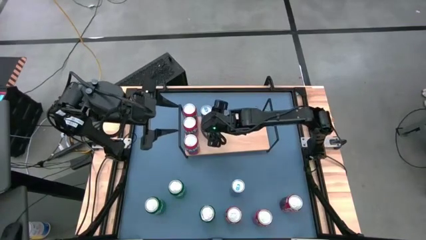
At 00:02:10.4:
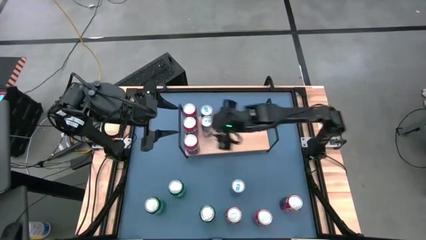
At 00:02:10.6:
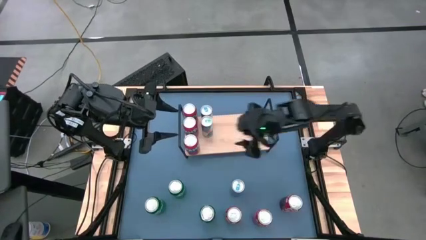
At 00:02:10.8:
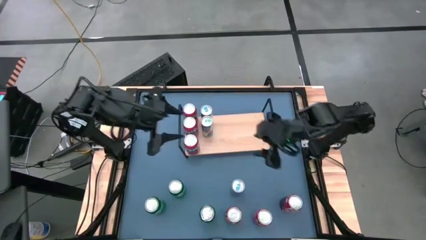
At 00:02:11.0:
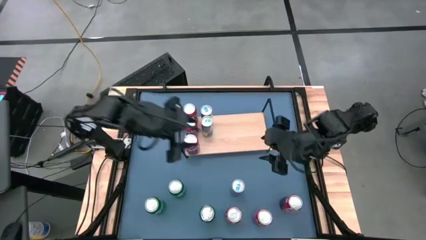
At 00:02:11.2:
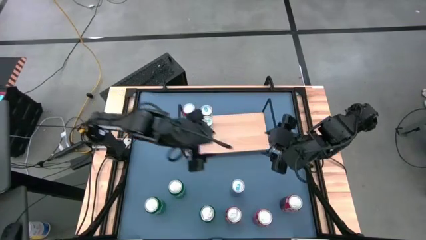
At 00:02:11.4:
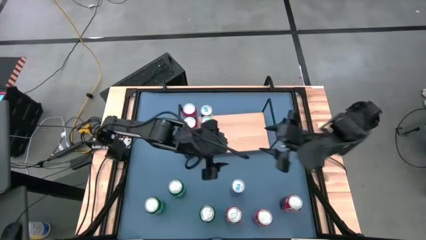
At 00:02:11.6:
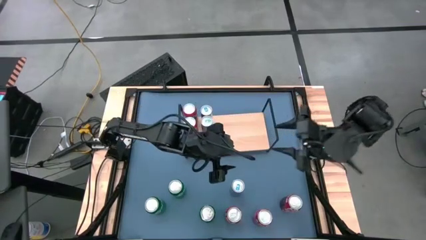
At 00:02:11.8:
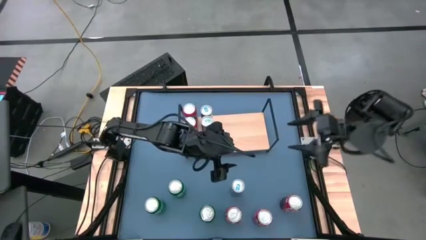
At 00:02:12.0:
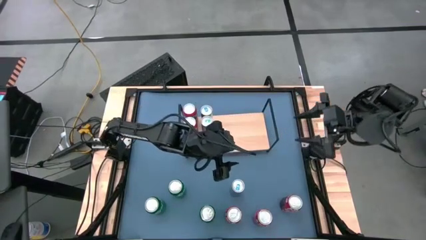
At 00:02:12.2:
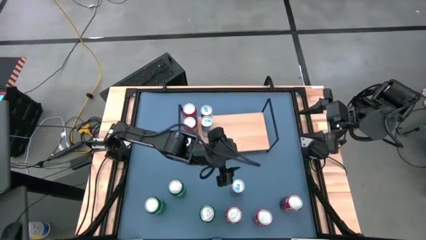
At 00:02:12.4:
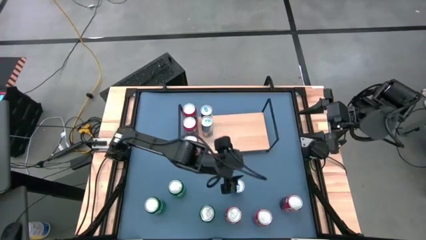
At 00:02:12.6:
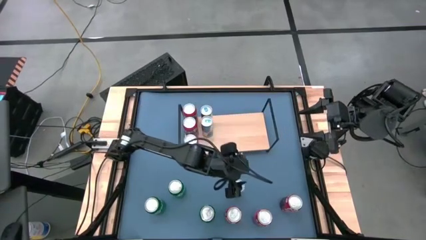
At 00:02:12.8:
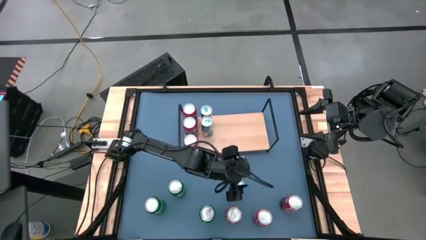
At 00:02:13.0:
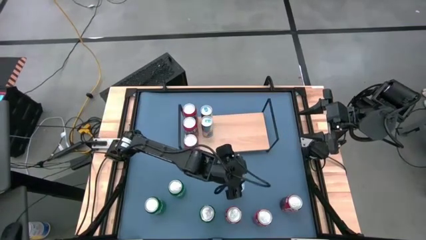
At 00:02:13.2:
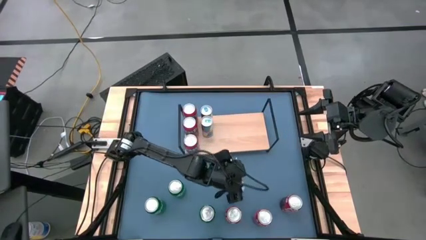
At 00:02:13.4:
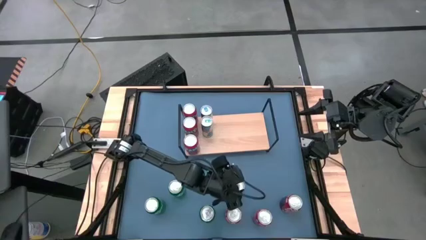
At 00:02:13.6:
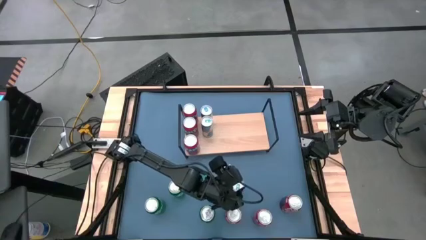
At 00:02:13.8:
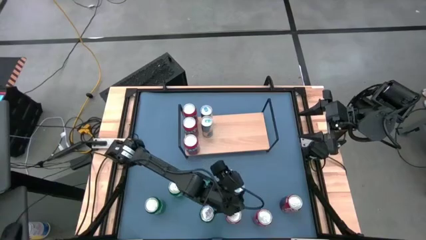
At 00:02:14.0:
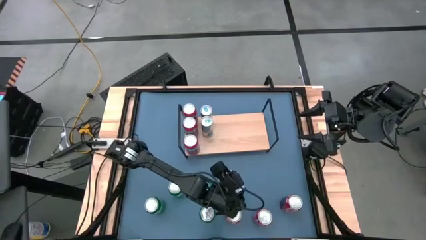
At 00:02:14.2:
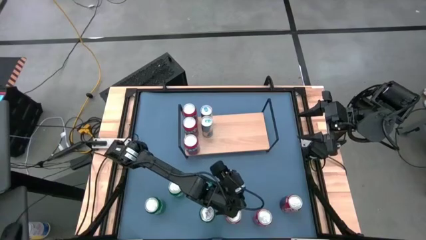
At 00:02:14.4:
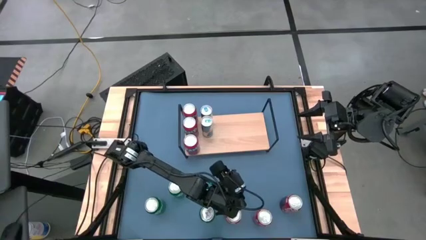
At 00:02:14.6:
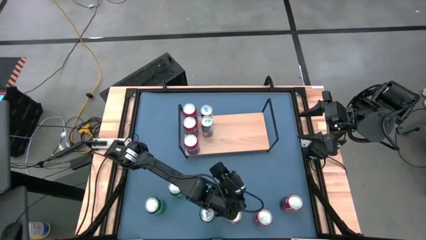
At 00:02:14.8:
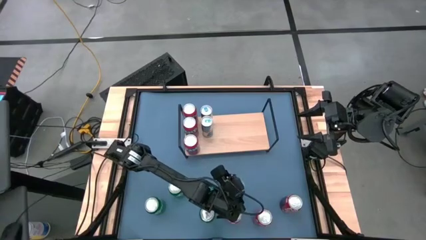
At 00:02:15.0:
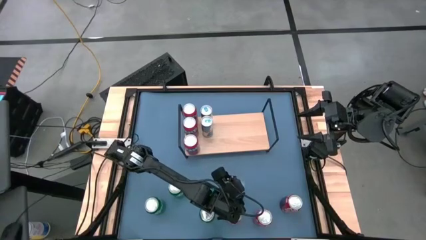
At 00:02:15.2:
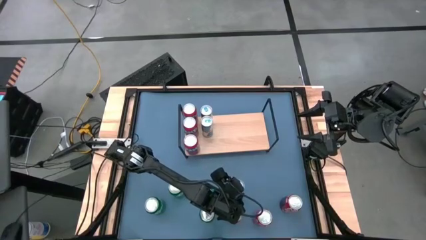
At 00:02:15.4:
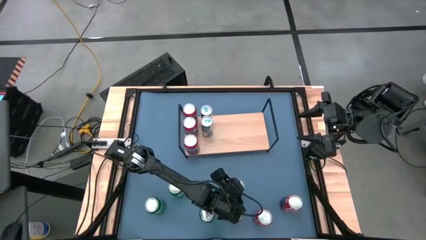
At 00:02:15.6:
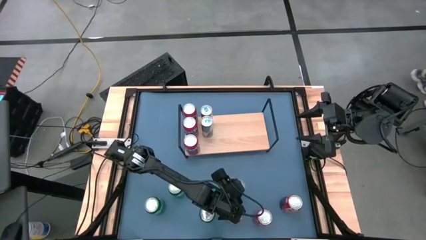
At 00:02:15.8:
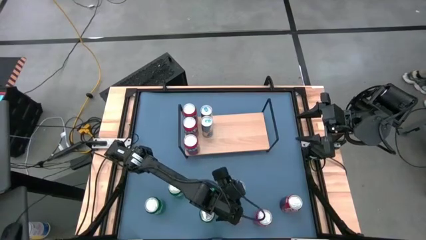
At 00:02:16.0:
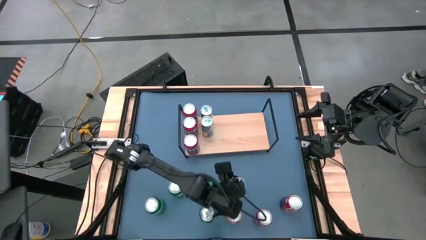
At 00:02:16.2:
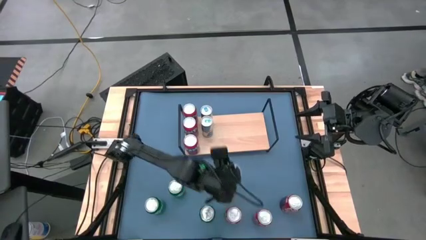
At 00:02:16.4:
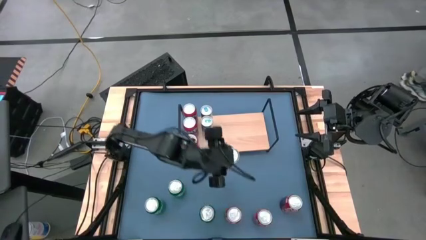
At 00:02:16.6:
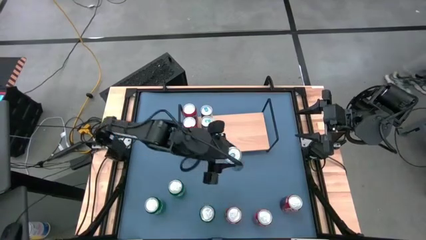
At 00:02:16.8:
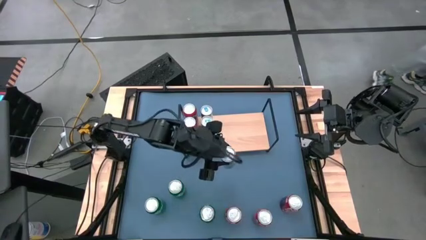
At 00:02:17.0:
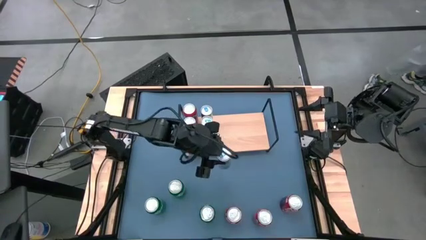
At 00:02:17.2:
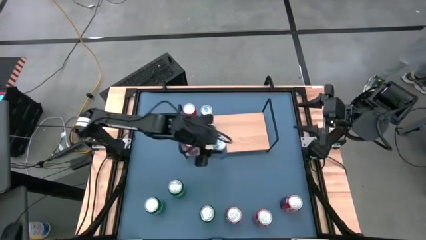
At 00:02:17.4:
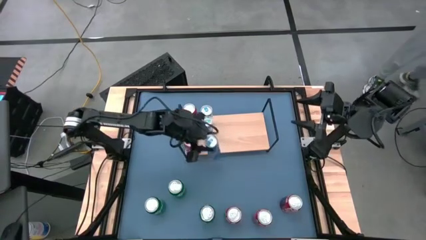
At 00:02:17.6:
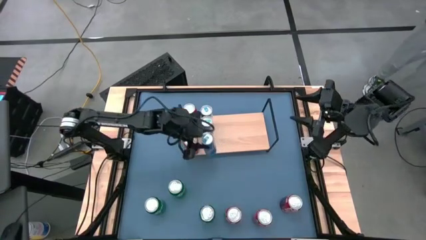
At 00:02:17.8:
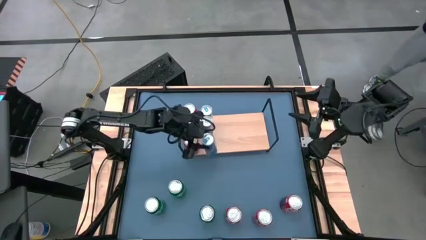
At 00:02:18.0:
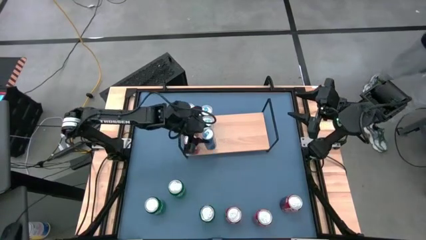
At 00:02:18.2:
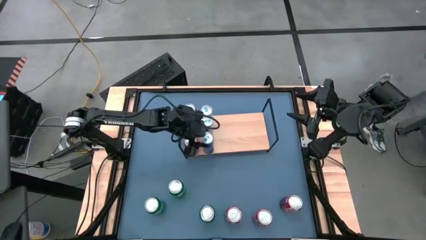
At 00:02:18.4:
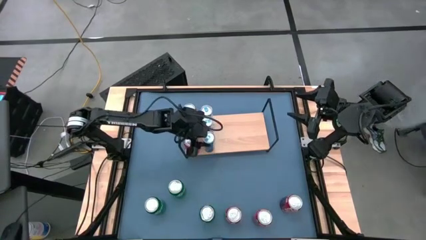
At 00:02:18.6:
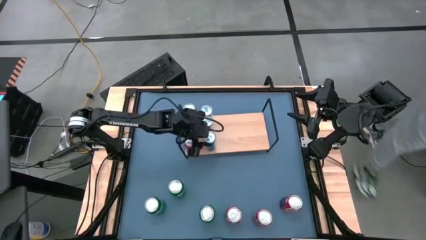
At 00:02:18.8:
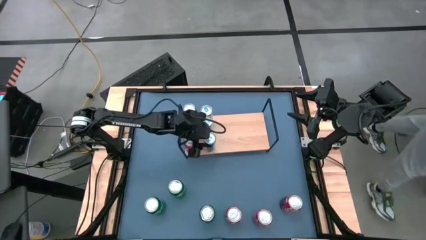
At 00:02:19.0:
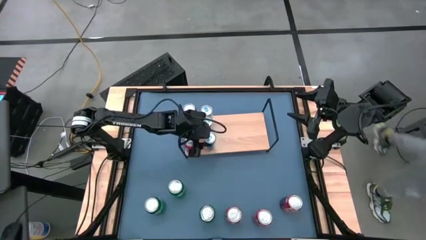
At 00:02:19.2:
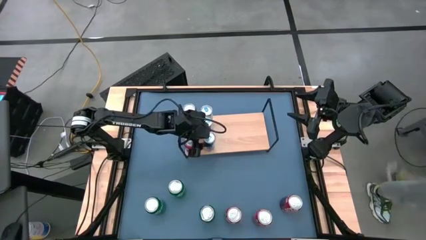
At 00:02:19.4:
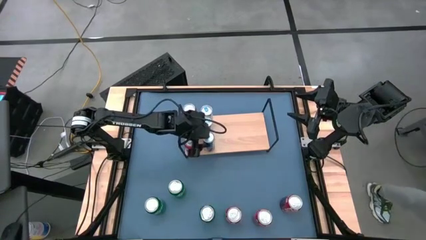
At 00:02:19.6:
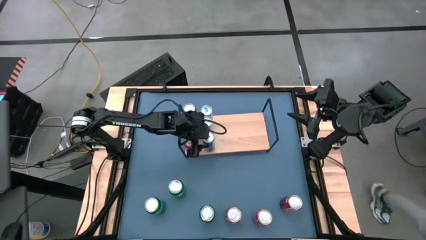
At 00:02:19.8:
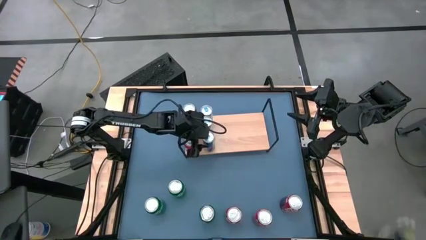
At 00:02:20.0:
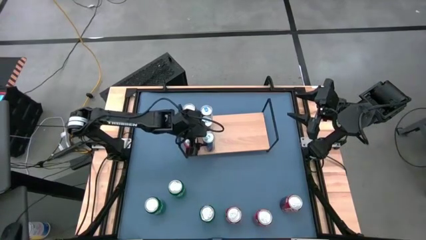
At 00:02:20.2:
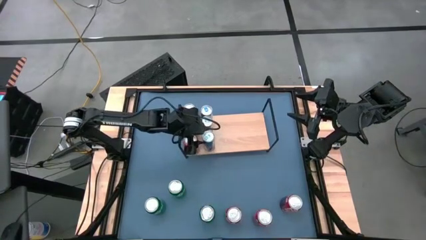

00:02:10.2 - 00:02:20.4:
Task: Place canned beverage on shelf
Put the blue soda can on the shelf aligned with other blue soda cans

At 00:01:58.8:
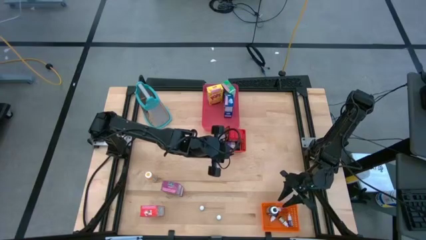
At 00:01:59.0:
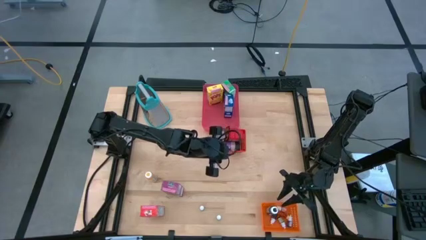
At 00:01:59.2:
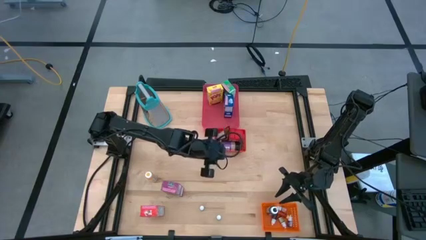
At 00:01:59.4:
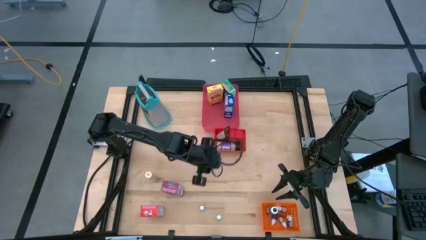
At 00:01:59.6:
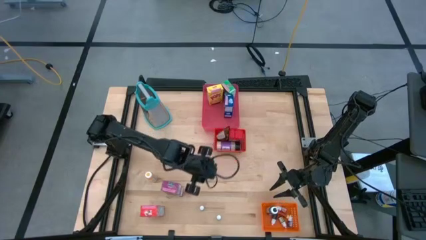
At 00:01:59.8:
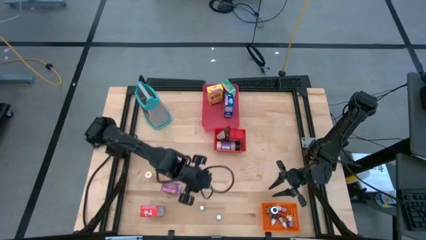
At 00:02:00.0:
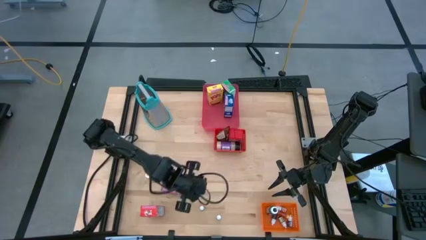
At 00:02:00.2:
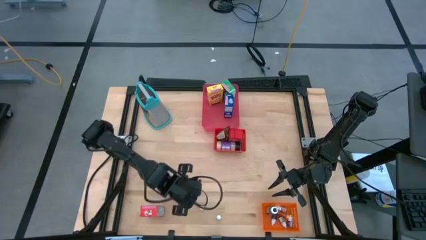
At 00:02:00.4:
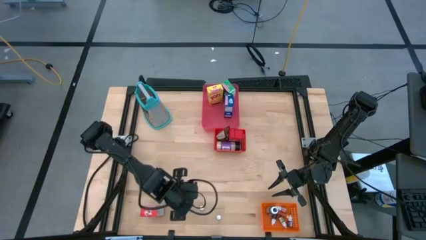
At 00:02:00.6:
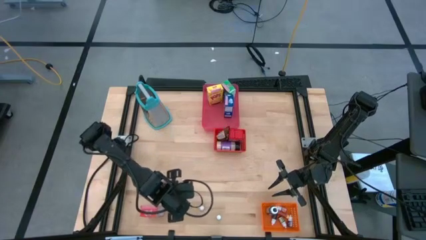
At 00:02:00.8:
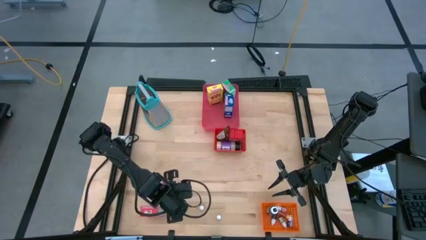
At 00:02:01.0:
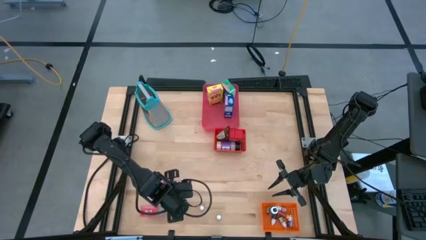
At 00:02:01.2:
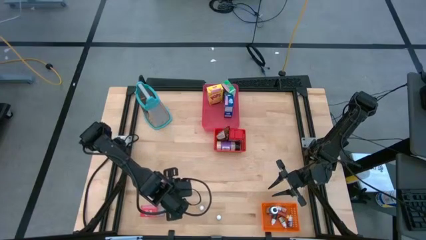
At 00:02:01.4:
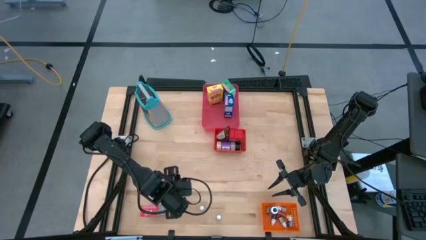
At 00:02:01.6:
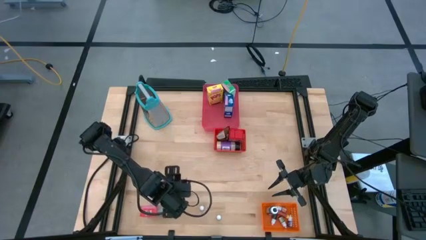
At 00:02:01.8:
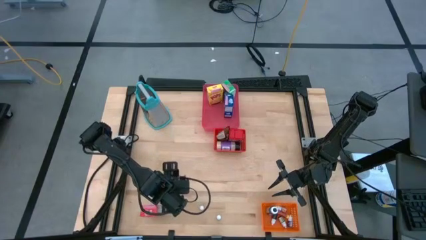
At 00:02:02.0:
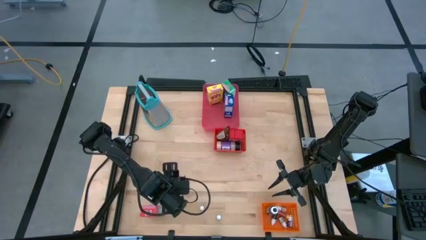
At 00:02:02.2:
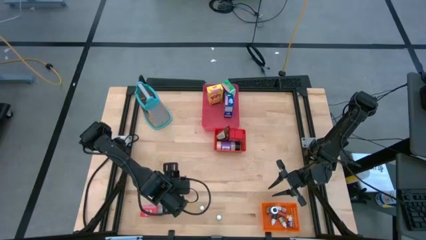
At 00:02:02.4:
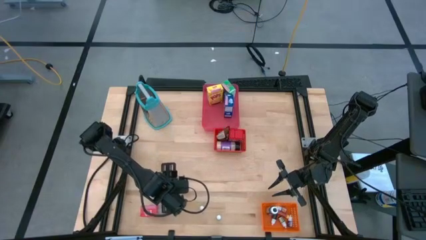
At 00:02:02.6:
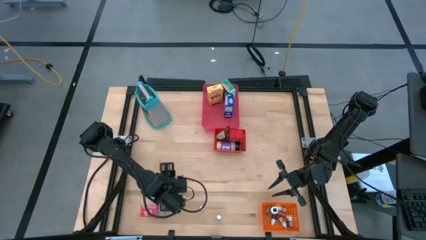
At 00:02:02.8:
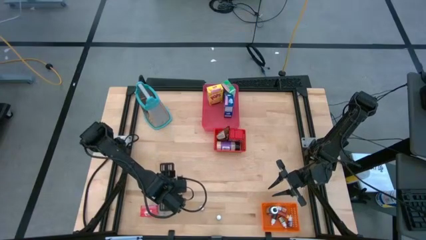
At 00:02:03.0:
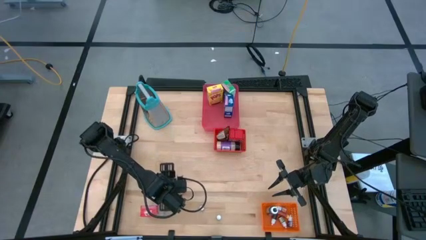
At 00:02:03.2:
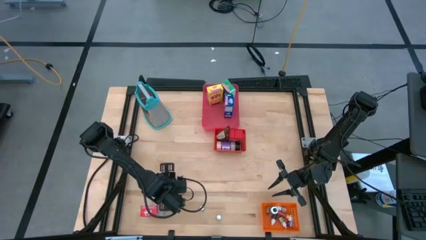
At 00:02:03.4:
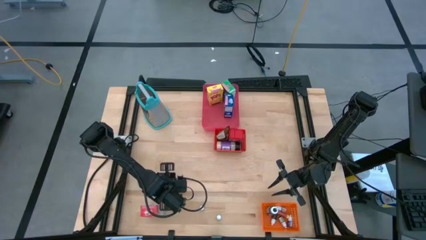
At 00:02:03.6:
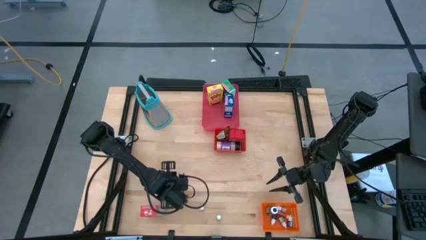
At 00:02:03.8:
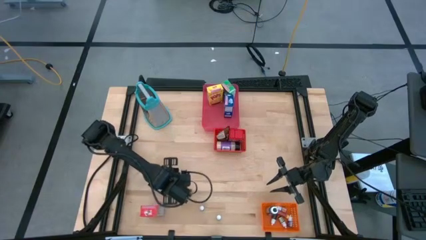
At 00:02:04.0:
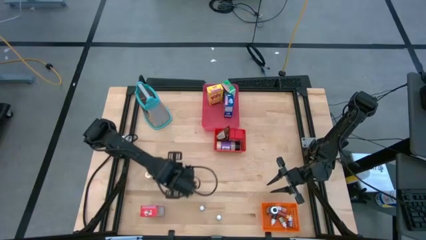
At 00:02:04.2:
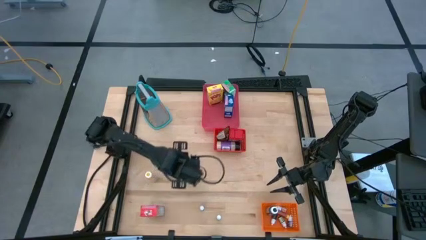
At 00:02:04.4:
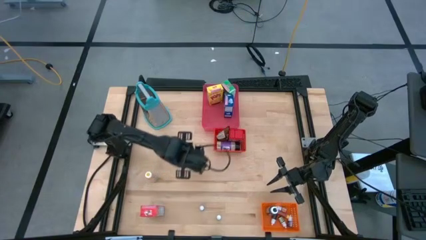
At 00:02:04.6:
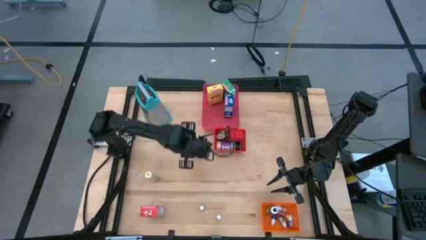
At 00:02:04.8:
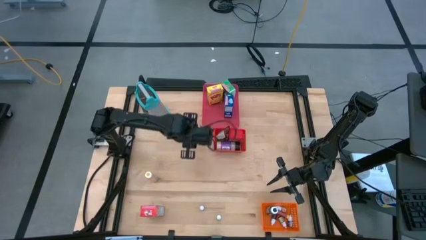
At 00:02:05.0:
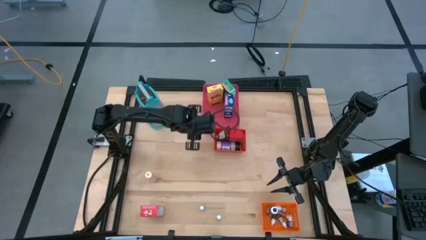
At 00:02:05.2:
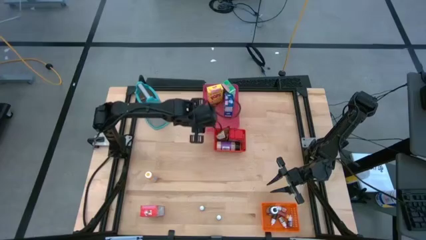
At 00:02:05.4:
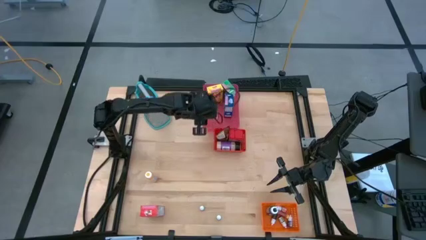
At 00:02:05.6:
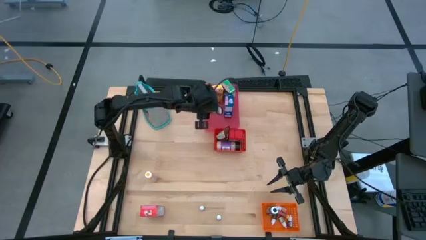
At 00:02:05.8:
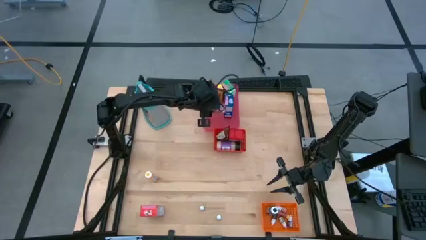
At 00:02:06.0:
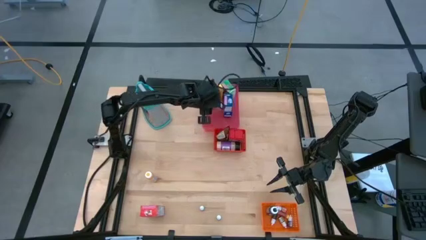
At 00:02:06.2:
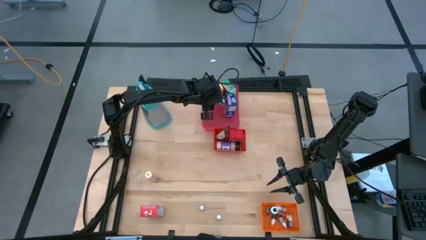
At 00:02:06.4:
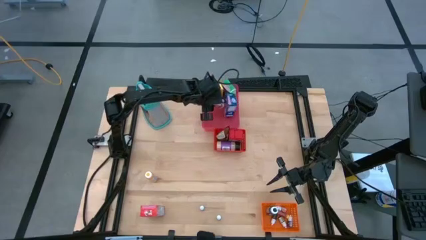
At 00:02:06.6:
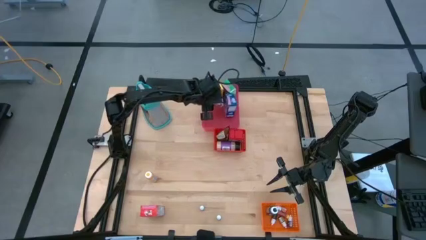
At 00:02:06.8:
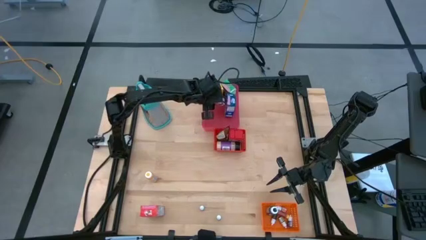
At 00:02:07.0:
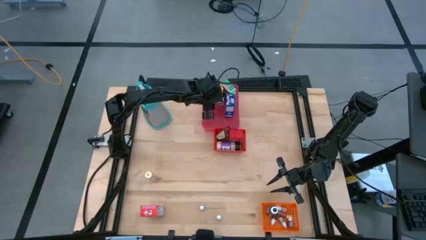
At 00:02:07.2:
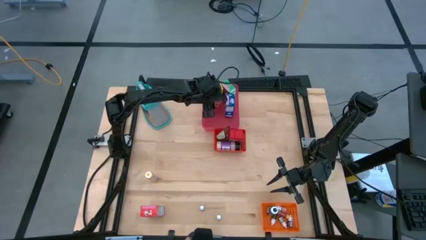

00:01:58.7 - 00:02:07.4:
Task: Pick & Place Kitchen Items
Put the violet cereal box into the pink bin
